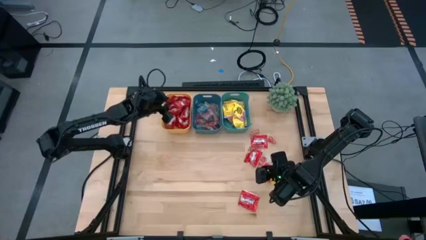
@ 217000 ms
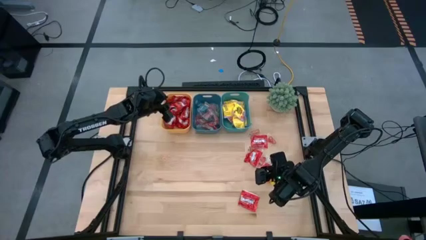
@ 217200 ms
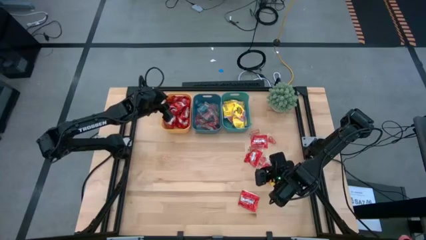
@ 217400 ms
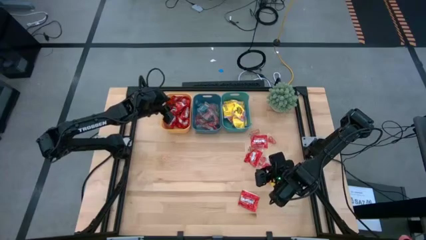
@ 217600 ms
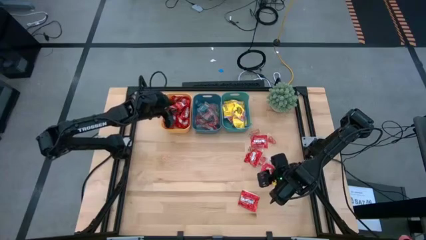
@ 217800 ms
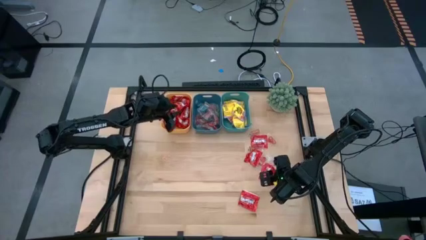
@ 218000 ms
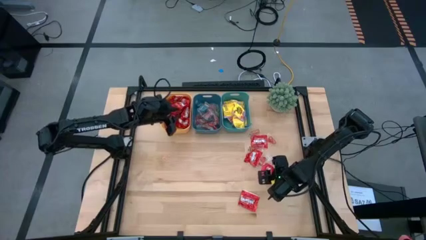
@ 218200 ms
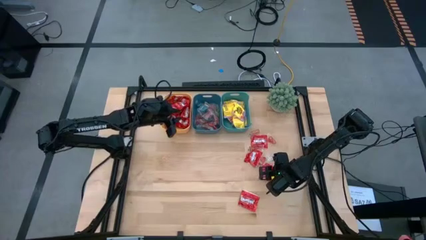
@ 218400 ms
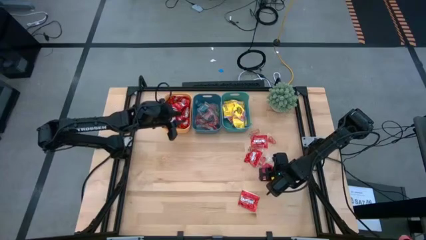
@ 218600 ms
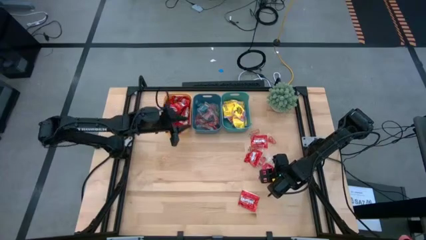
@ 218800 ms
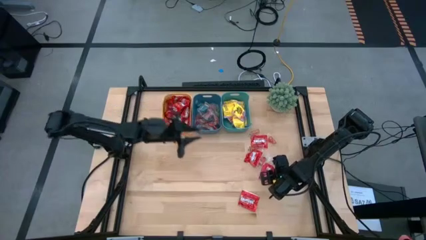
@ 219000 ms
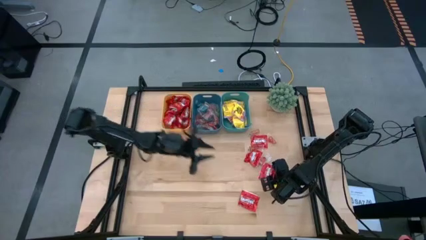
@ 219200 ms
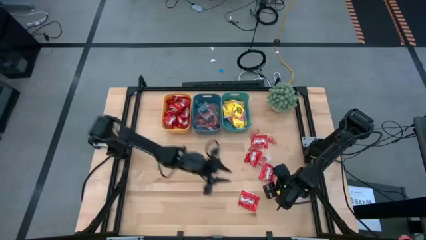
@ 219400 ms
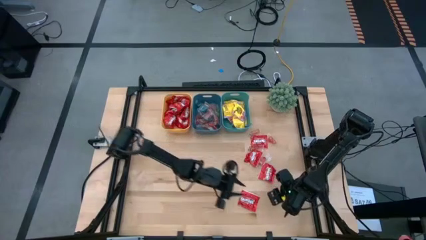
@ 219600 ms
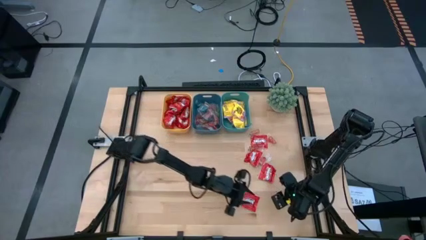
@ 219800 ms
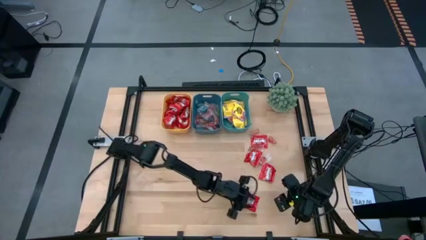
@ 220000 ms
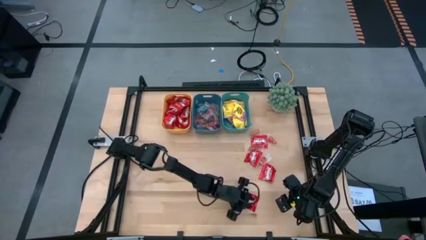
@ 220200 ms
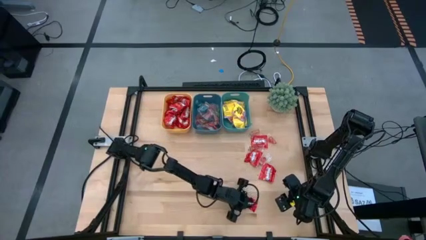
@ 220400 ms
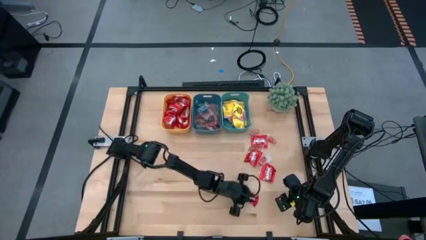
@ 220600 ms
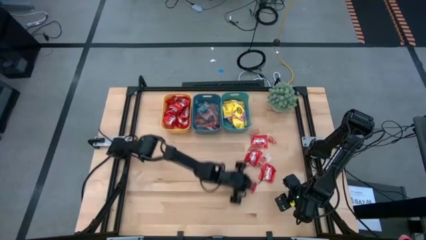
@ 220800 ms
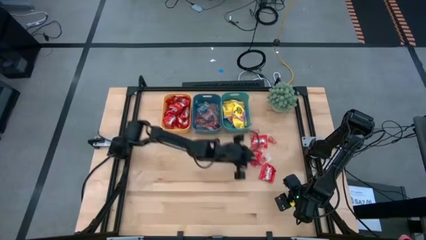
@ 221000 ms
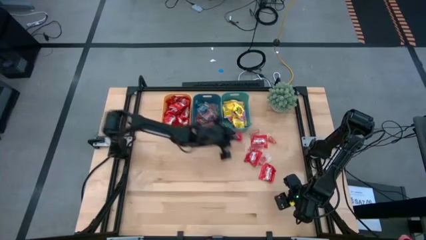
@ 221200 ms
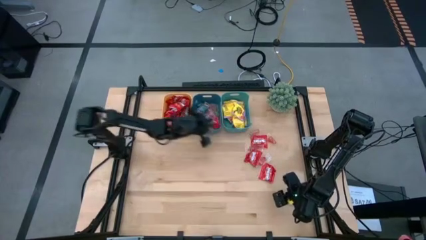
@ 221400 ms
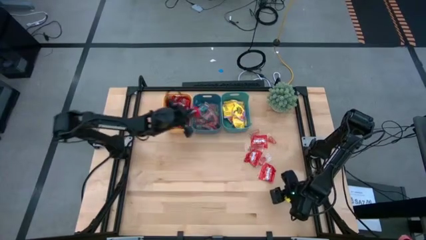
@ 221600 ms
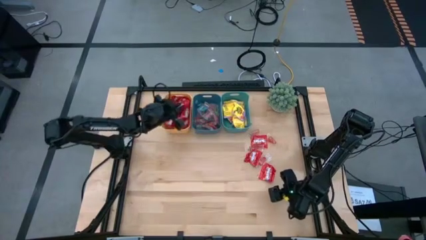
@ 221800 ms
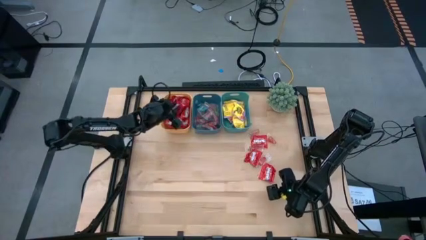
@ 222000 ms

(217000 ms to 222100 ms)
Task: Sort candy
Put the red candy into the yellow bin

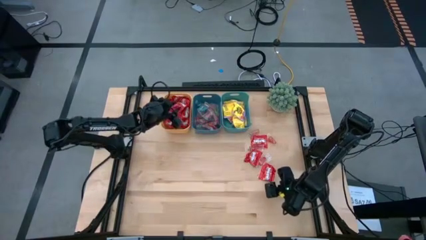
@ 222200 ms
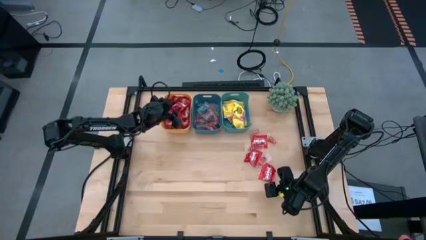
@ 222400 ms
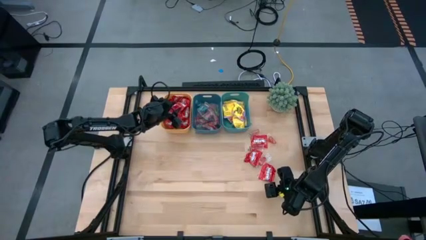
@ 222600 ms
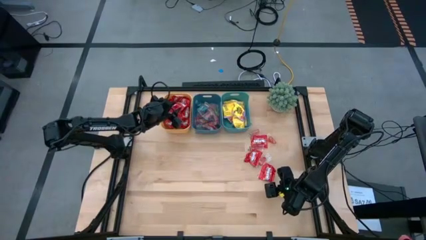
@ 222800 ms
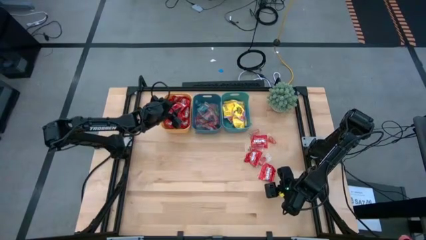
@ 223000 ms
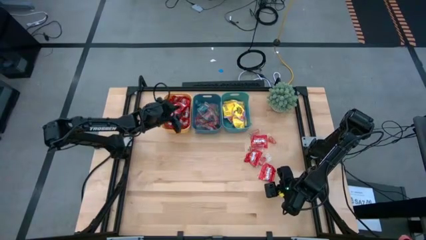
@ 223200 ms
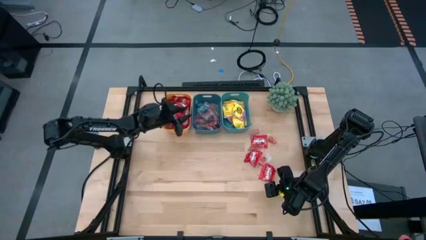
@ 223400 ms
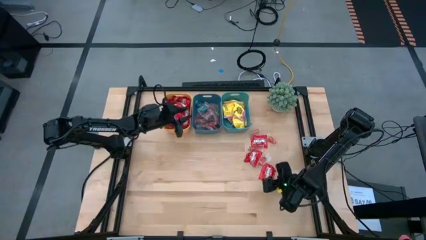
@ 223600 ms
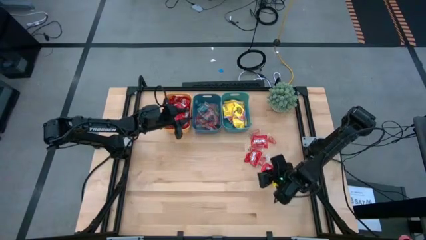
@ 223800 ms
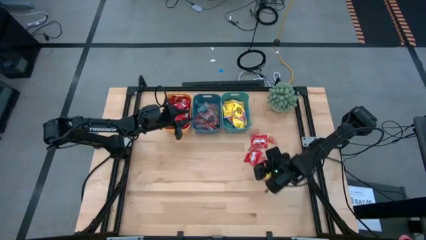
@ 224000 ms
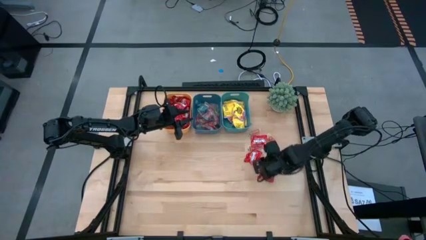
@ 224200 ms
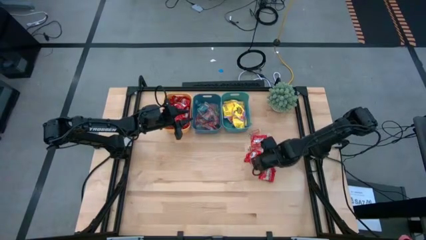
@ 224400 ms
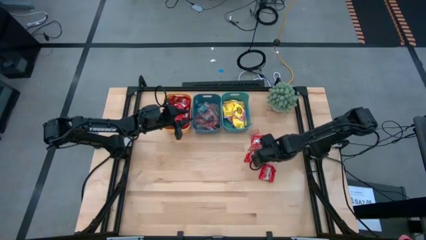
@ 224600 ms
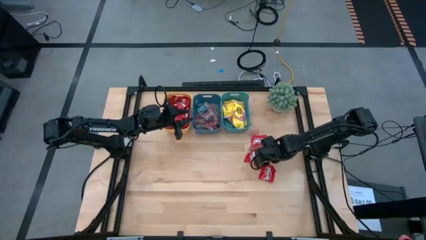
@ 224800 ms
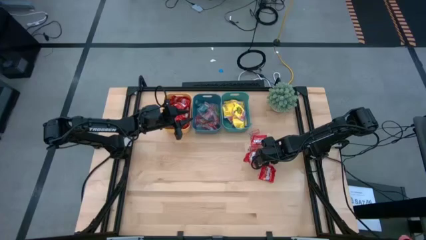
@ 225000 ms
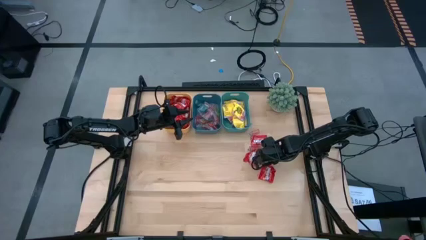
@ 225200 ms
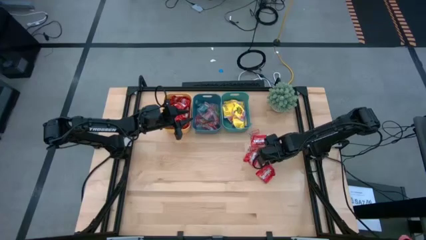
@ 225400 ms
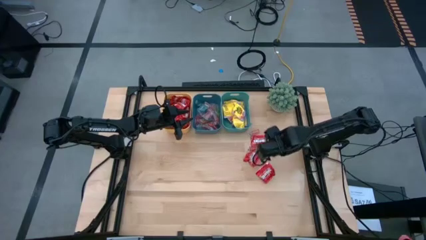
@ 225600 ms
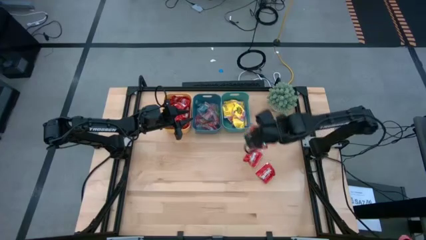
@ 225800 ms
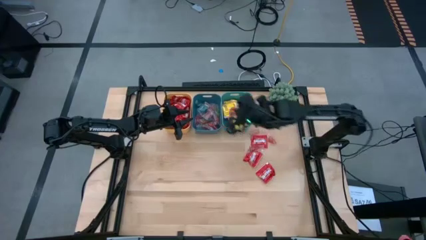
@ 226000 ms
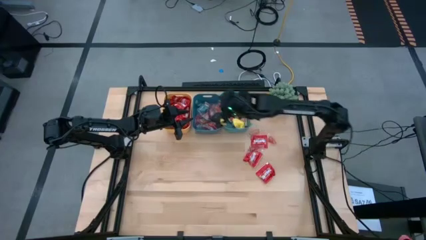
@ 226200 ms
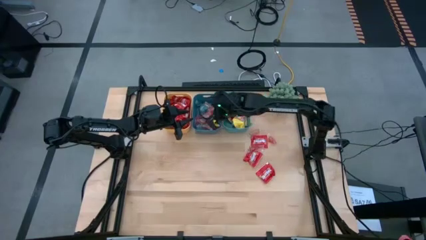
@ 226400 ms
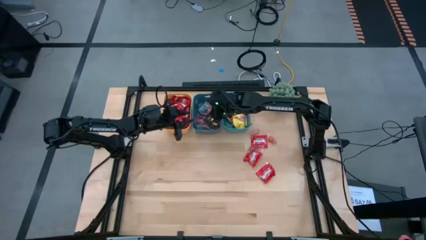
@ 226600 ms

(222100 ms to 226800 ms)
Put the transparent red gummy into the blue bin

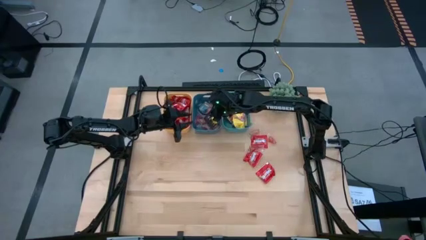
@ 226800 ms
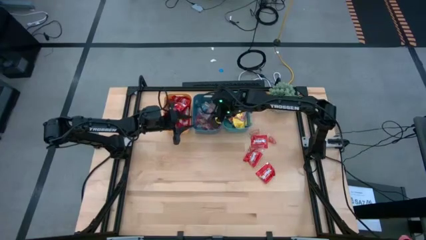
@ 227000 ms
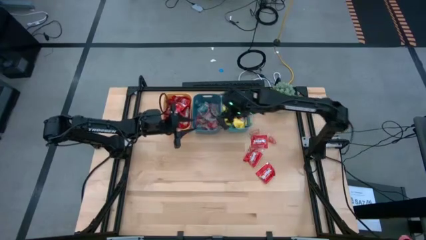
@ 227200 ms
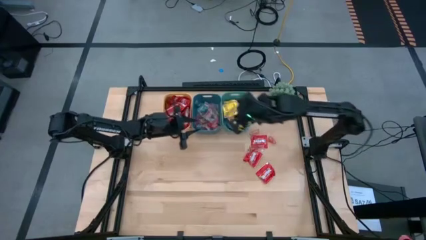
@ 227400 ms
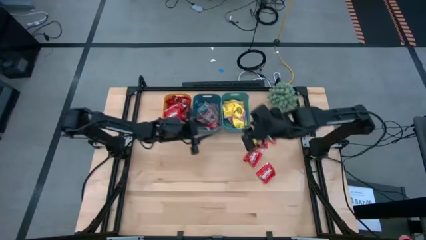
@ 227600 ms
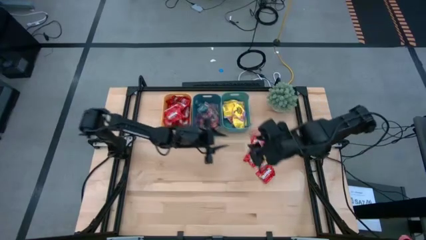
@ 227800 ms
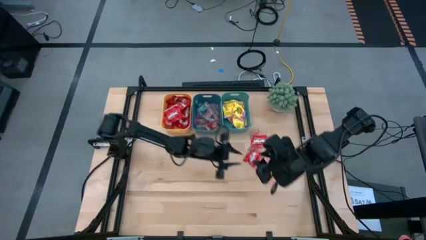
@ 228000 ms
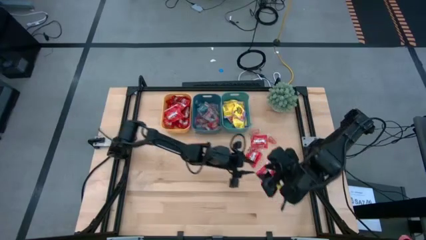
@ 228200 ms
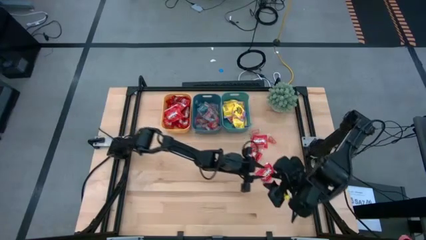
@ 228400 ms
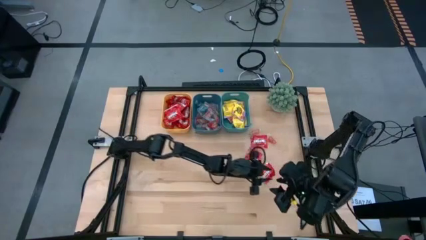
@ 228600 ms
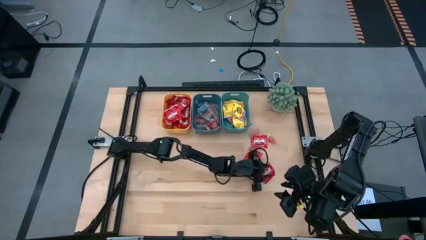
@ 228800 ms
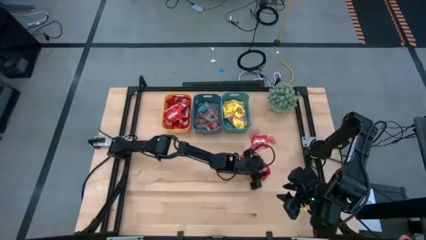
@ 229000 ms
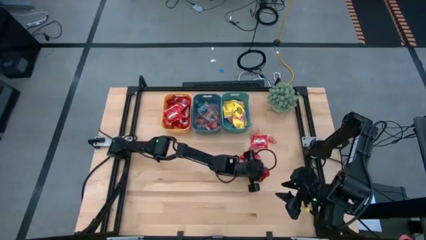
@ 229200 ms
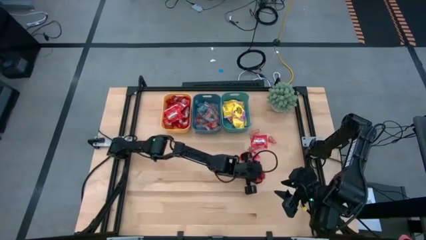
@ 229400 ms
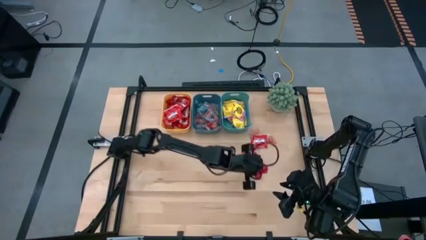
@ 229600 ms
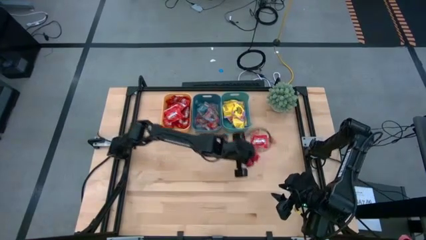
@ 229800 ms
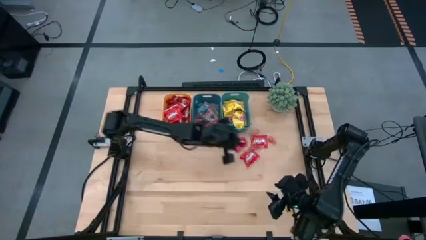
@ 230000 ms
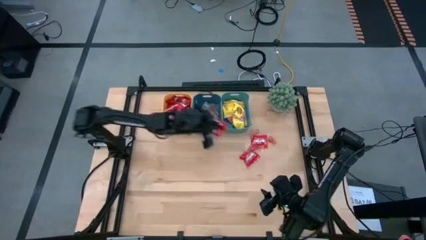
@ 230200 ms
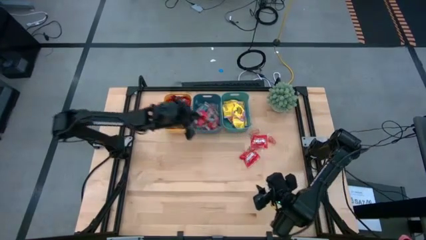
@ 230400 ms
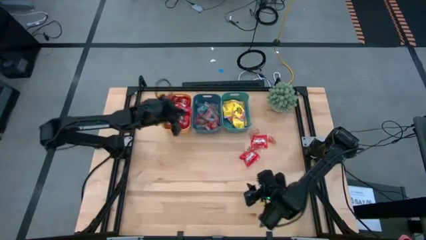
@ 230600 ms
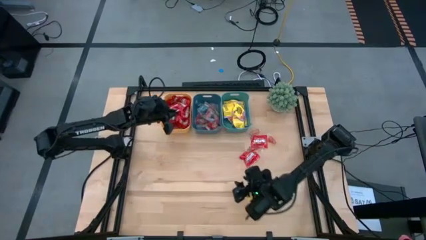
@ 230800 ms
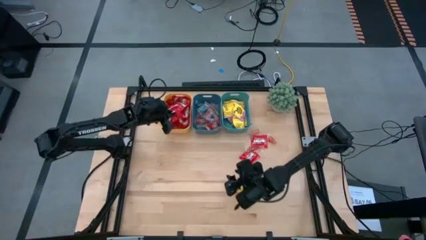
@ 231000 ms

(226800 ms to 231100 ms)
Put the red candy into the yellow bin

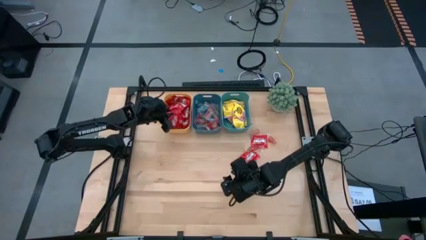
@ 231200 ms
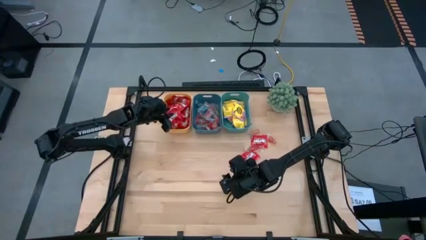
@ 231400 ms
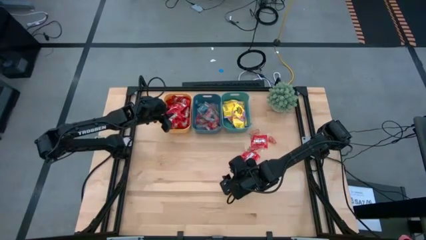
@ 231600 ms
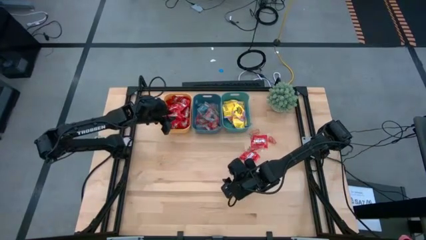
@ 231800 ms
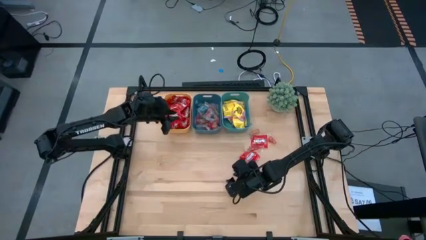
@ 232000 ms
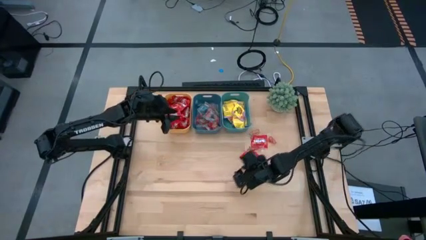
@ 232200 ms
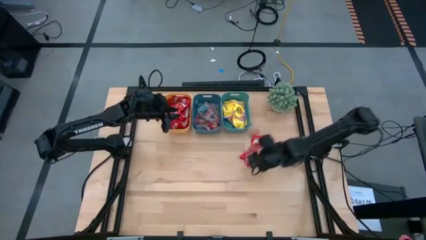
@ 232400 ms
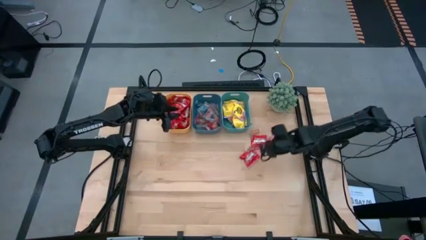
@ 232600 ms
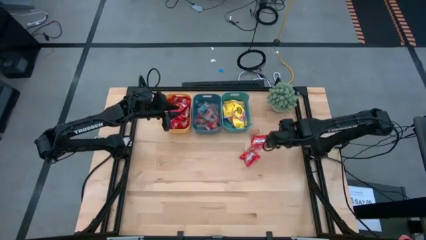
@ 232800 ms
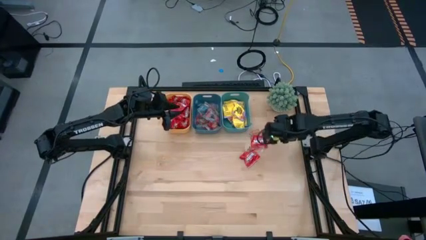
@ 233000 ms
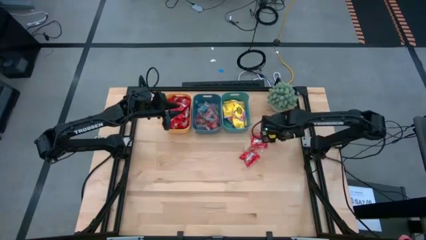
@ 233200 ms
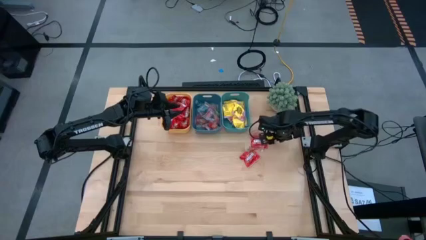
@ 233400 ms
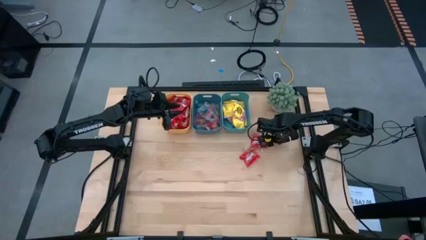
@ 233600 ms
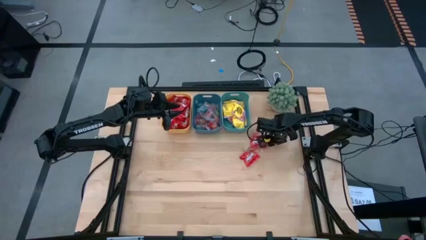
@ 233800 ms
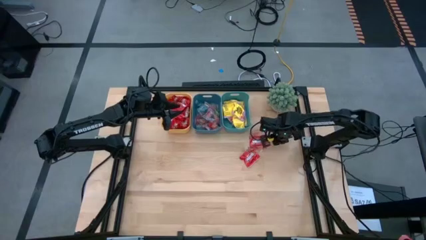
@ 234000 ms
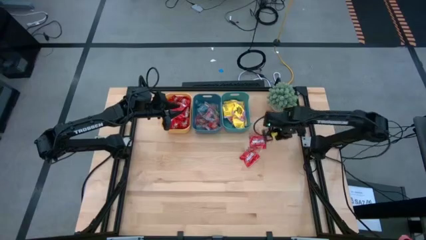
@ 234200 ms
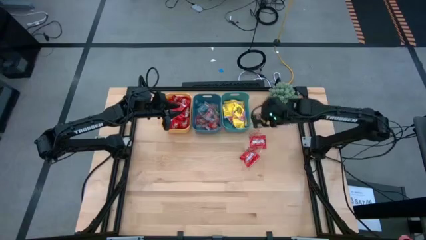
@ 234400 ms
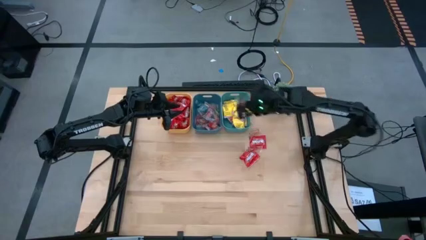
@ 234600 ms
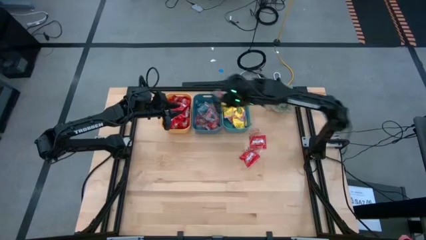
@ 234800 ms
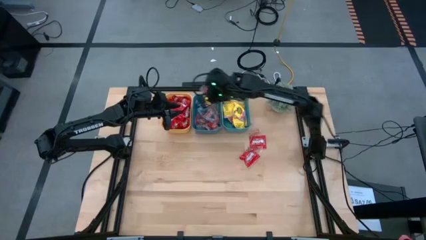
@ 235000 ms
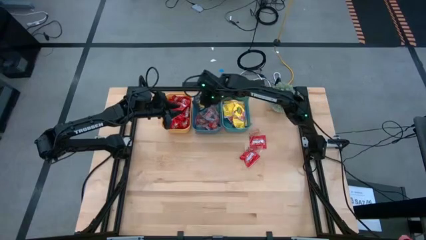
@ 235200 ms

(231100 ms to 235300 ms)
Put the transparent red gummy into the blue bin
